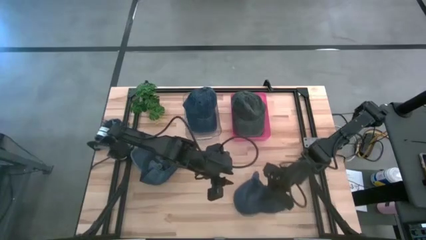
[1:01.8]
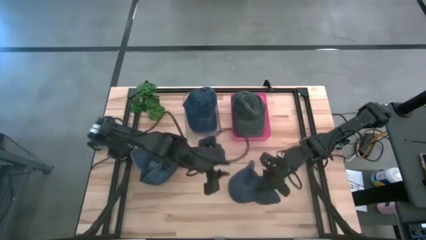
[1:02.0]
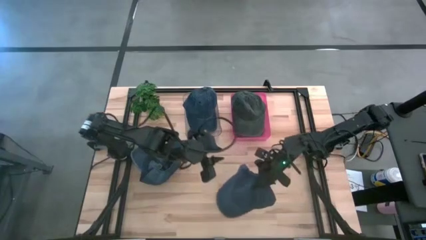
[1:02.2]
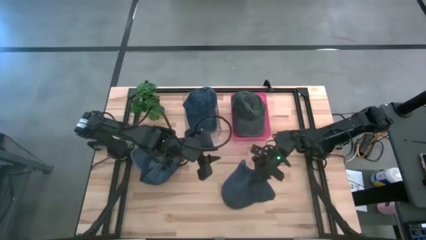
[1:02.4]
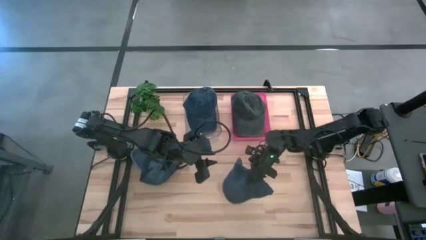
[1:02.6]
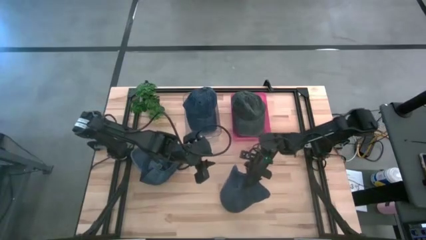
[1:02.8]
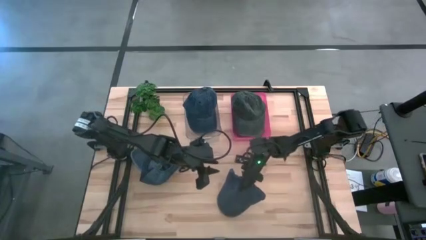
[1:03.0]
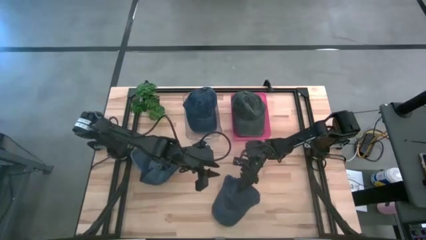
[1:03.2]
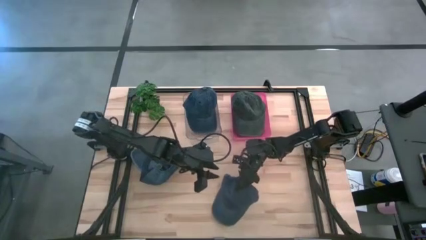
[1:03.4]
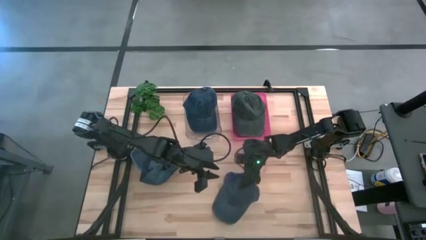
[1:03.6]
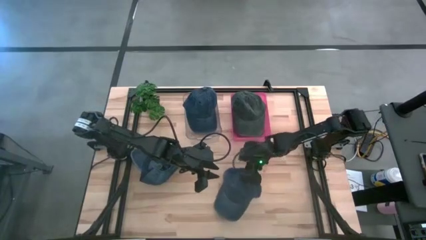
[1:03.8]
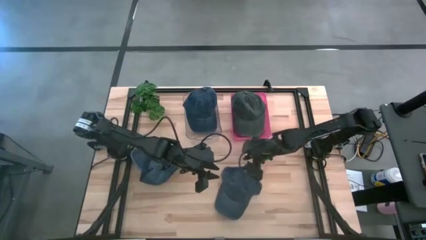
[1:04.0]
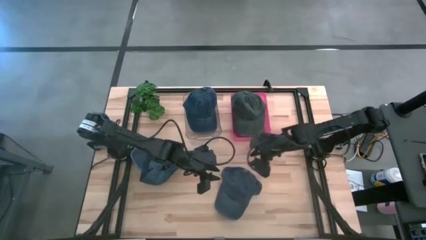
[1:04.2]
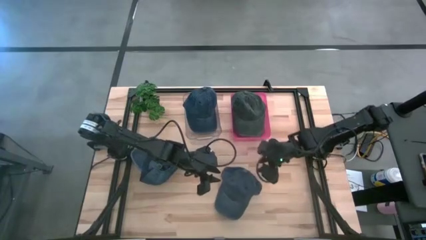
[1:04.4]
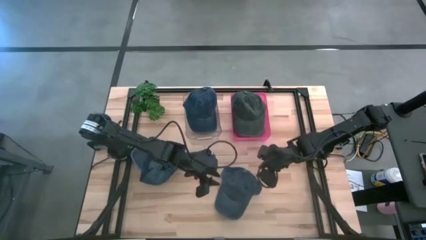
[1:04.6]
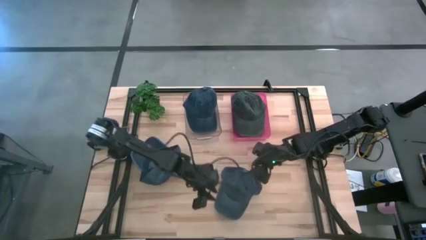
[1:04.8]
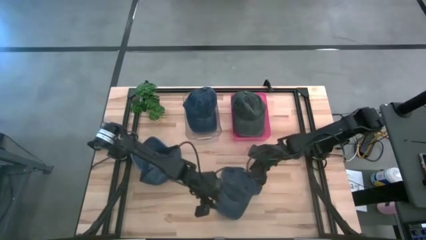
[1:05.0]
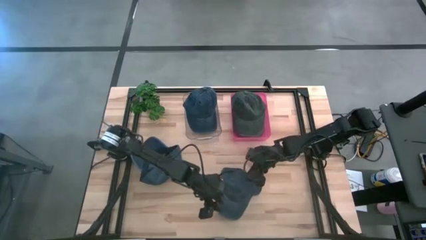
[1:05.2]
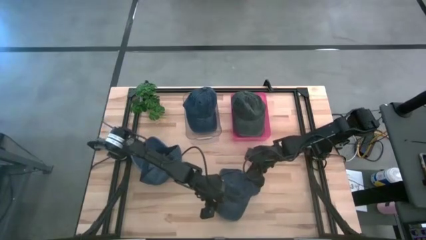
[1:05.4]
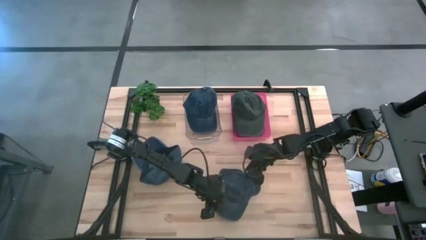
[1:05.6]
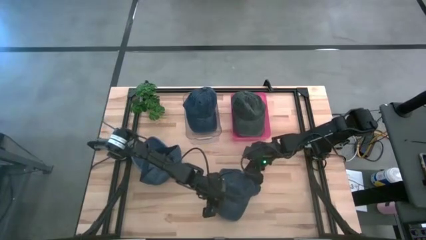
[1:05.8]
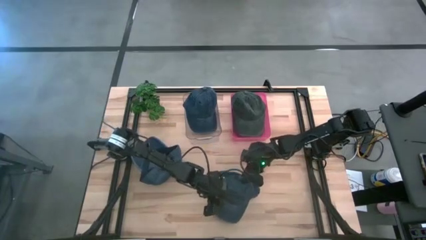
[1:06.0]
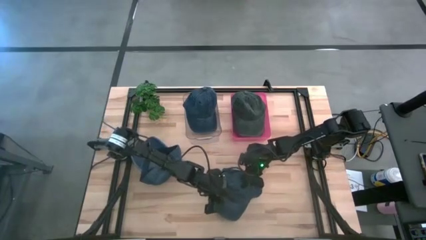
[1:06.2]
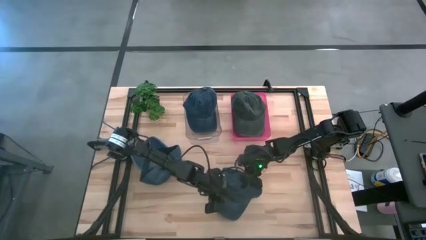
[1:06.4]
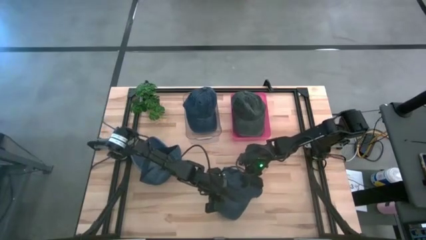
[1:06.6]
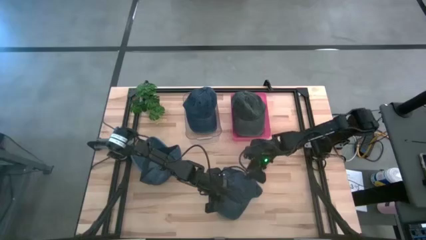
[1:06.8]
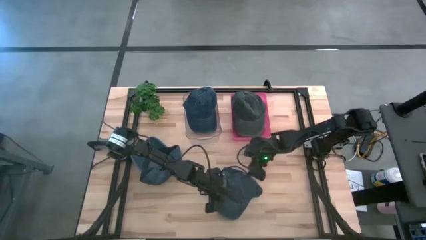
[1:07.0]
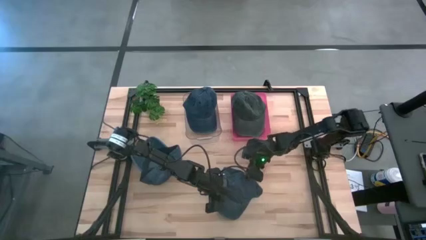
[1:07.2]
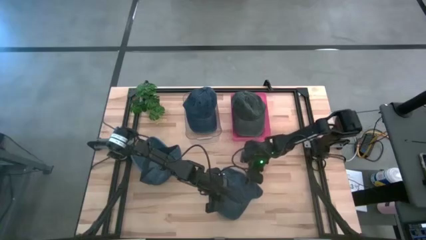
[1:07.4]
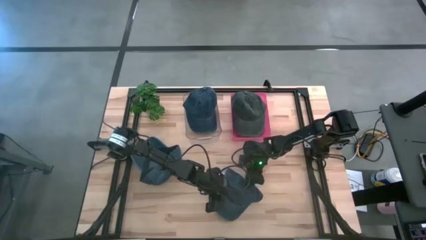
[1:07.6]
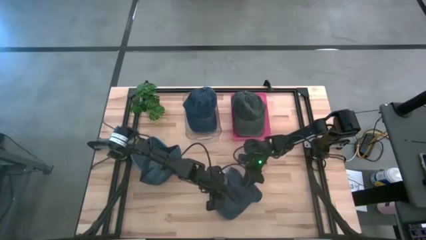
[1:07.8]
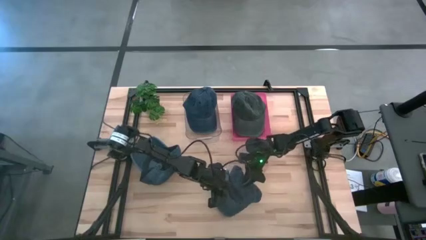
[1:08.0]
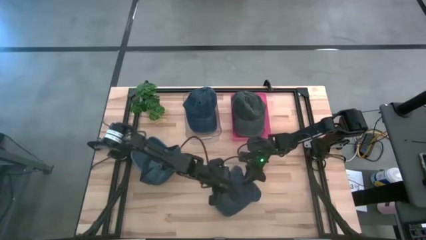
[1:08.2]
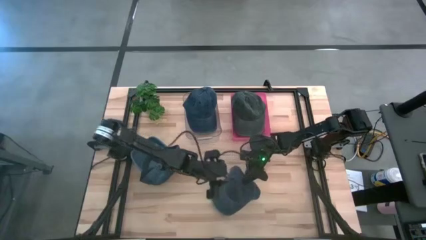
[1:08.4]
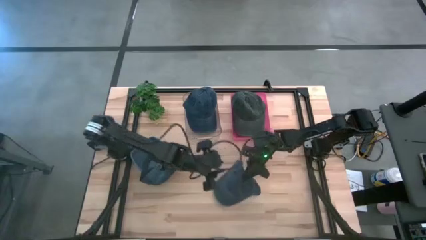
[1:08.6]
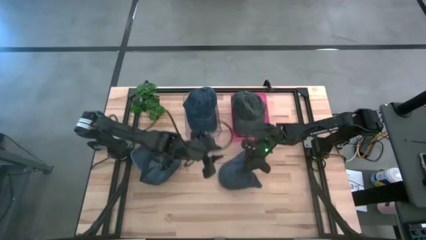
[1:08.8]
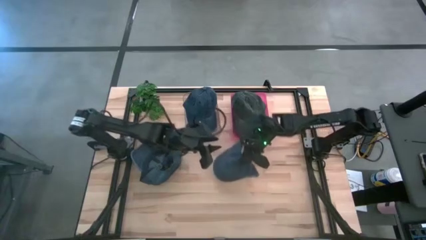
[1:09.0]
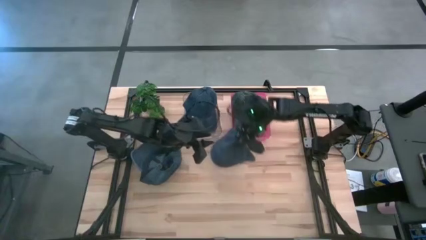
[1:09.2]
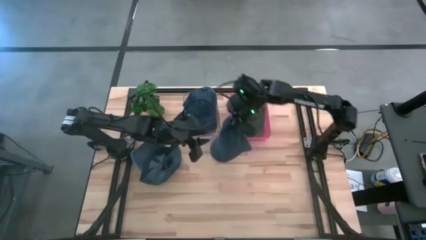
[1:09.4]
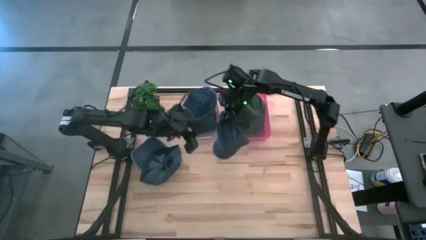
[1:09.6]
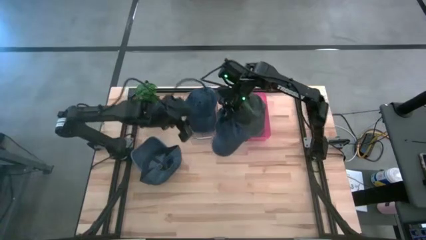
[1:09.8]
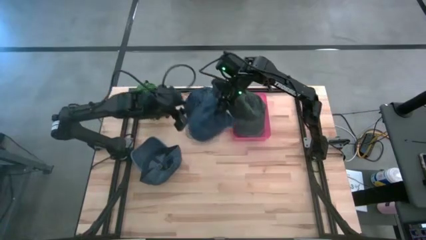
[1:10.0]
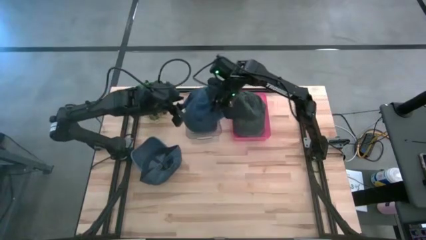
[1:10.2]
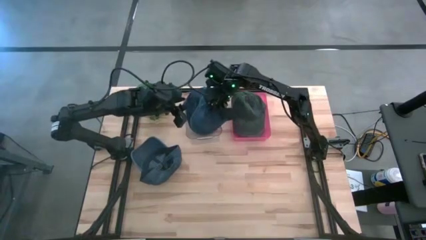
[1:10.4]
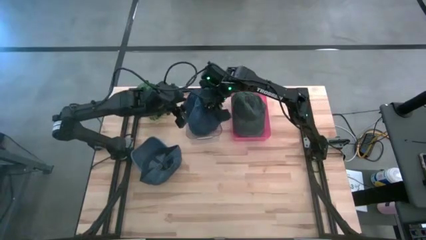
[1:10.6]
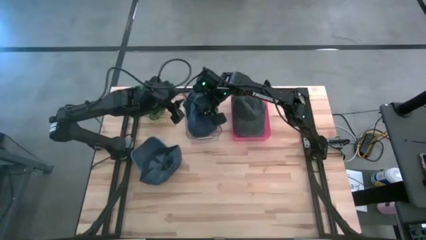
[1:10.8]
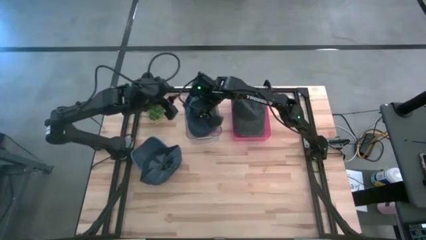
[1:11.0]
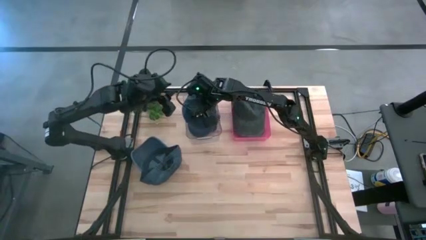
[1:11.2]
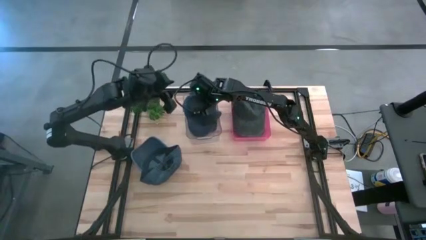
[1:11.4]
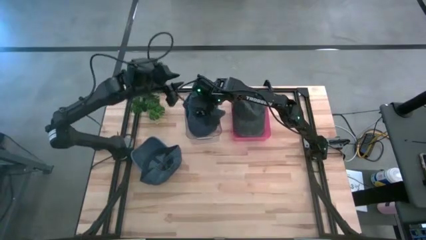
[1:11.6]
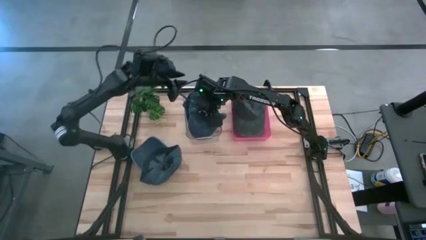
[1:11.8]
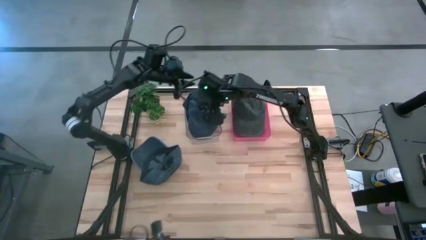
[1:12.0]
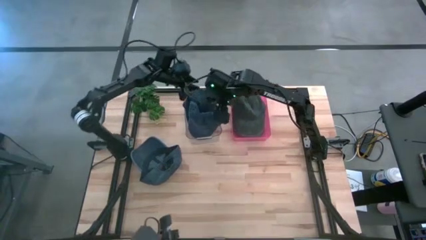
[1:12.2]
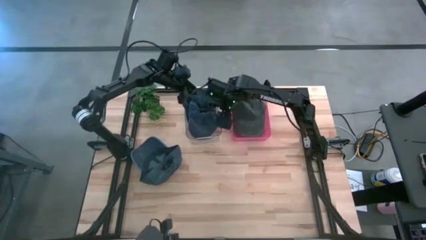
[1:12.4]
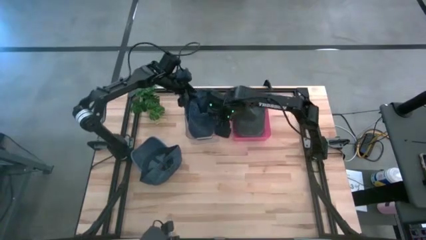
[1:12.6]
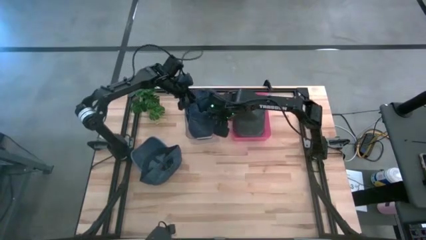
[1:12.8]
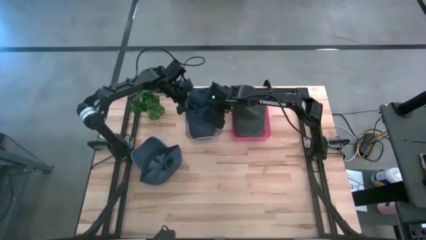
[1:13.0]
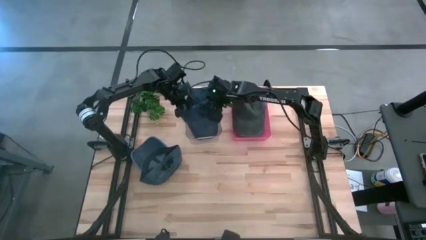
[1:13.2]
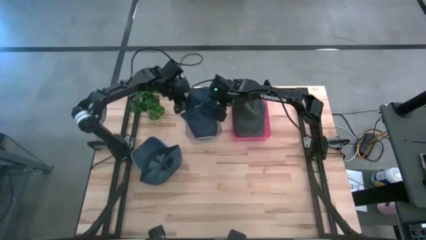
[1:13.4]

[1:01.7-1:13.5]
Task: Pick & Place hat
Put the bottom blue cap into the transparent bin

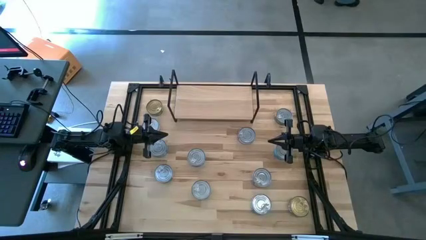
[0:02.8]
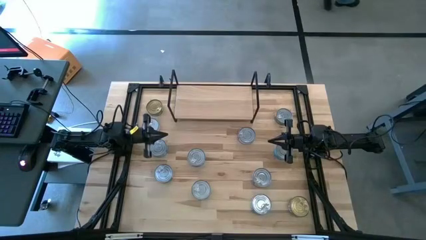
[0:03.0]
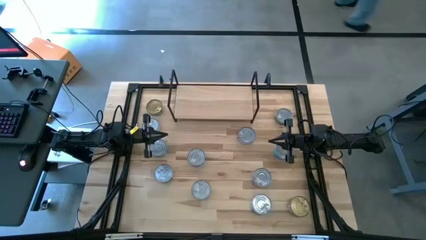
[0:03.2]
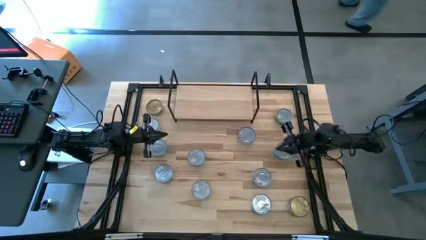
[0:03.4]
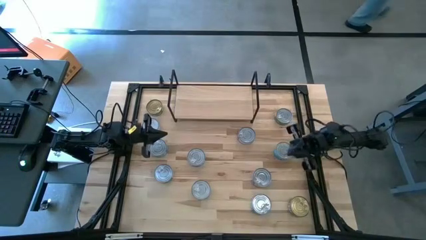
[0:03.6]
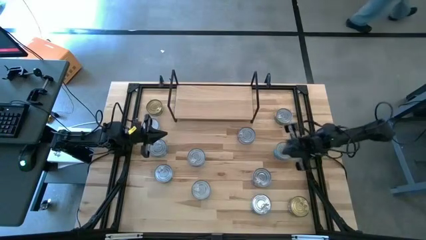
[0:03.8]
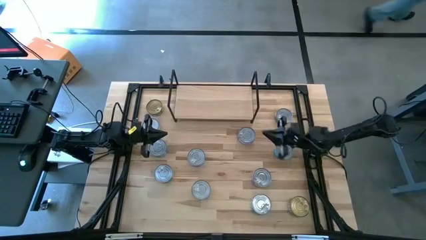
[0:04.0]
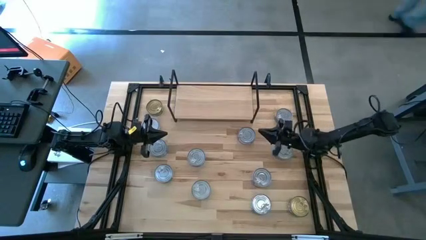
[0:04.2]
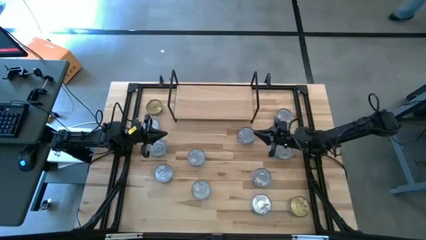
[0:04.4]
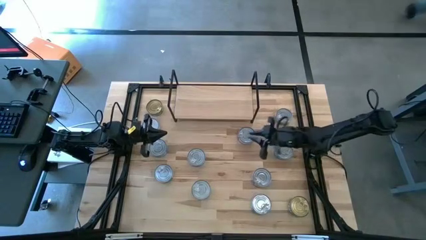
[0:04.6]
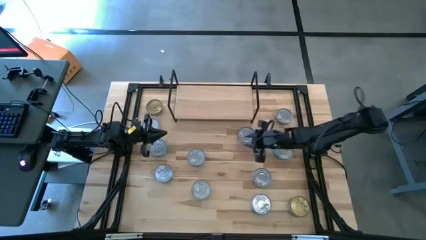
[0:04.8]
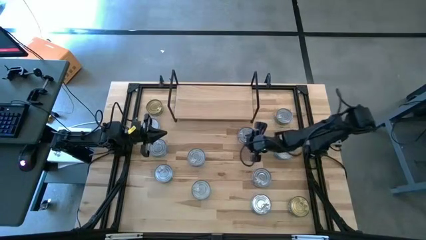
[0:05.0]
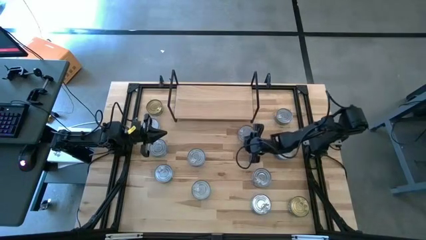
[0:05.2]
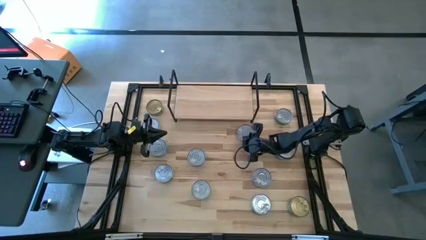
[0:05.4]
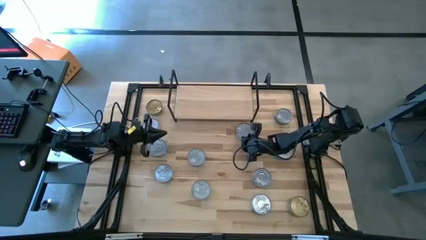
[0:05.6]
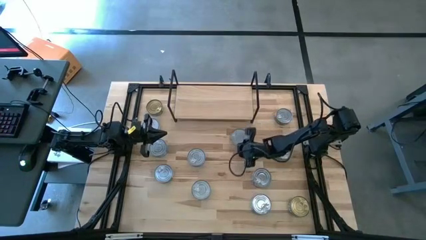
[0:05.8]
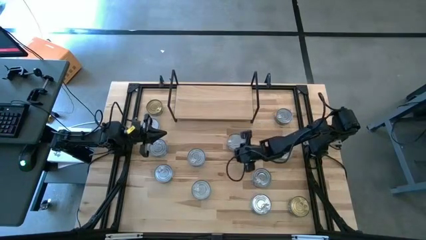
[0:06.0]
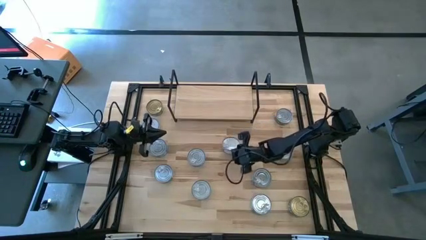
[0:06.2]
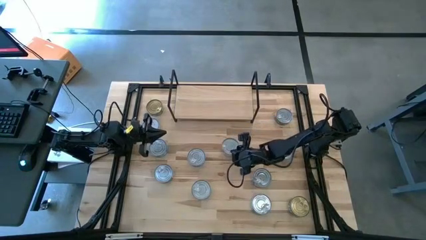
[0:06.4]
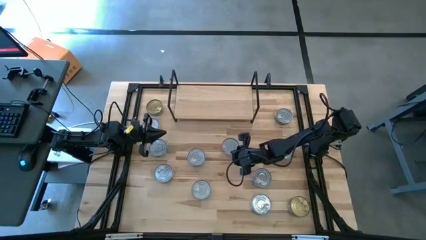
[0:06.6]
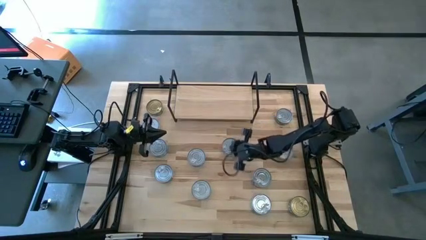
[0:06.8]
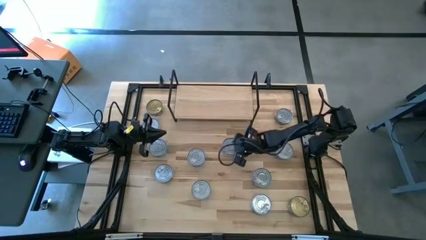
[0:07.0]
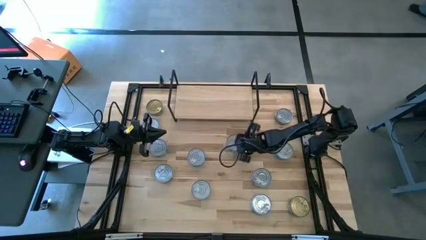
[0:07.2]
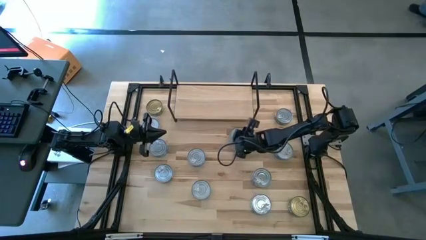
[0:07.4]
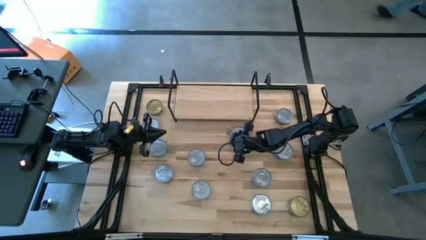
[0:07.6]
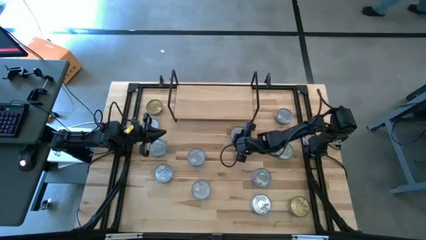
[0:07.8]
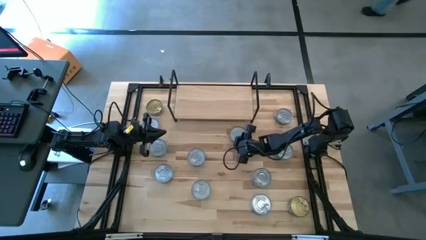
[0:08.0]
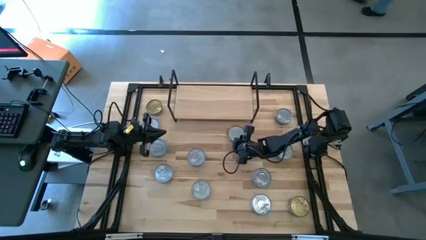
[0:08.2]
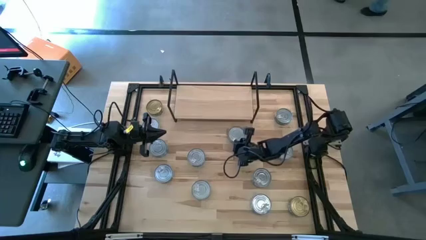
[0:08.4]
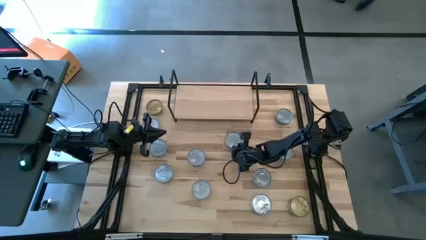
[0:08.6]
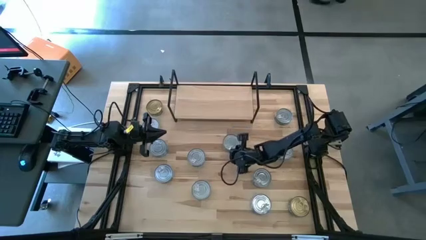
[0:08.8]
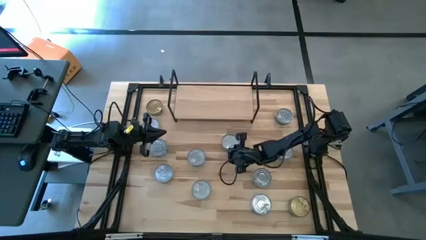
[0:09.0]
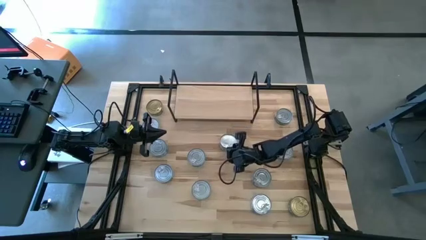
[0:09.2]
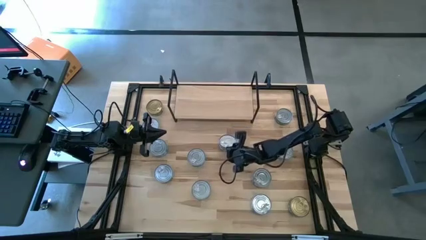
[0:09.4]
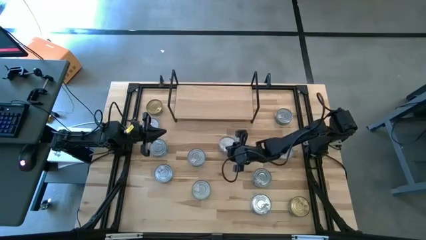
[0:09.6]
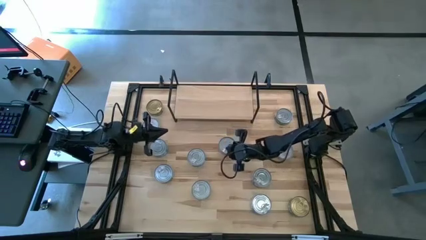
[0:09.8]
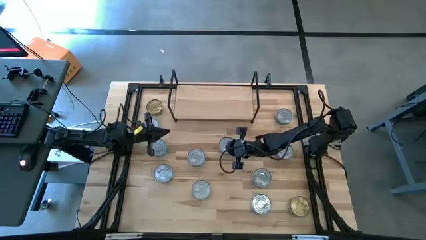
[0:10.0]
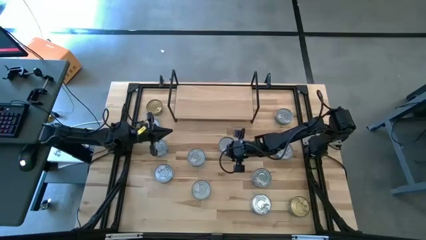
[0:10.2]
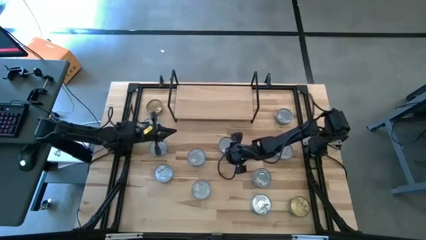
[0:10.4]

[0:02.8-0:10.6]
Task: Stack canned seafood by type on shelf
Put the dark blue tuna can on the shelf
